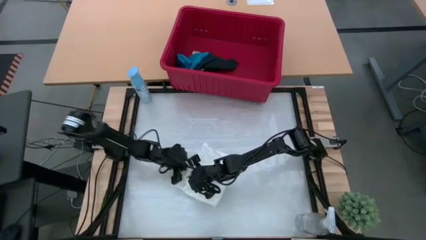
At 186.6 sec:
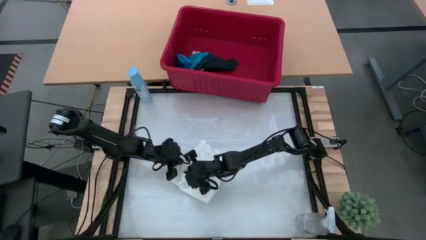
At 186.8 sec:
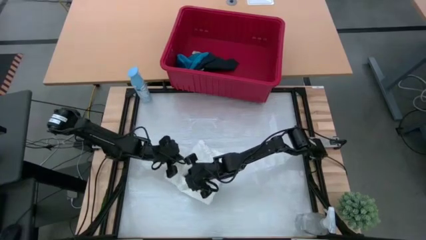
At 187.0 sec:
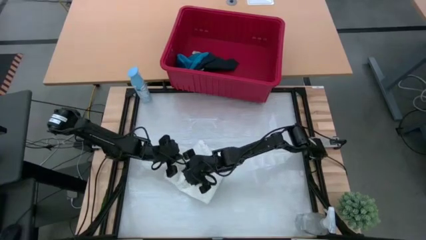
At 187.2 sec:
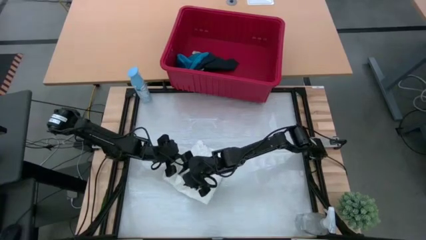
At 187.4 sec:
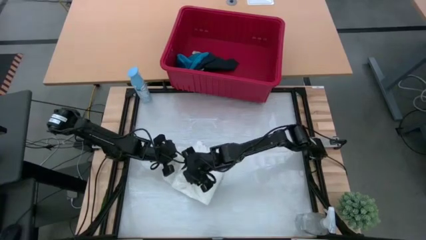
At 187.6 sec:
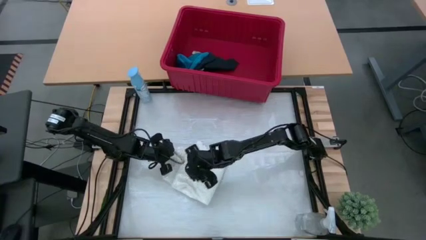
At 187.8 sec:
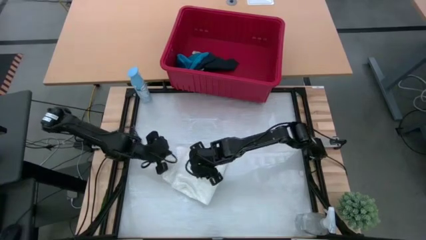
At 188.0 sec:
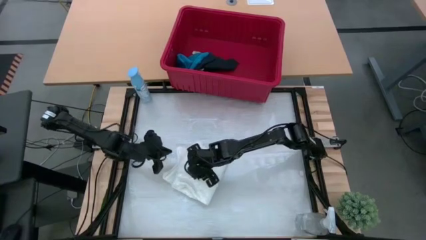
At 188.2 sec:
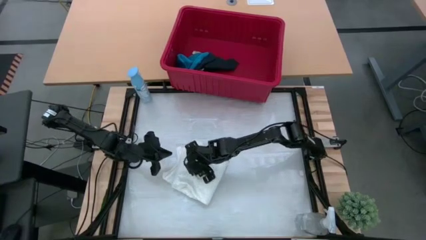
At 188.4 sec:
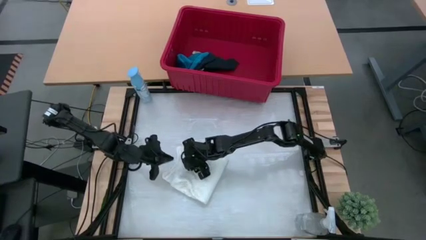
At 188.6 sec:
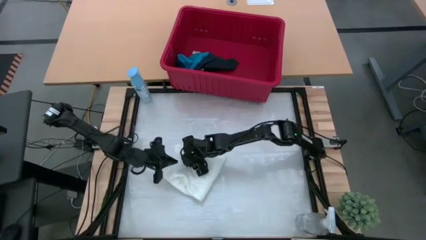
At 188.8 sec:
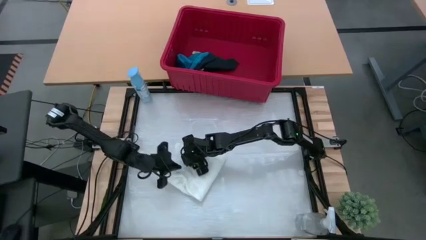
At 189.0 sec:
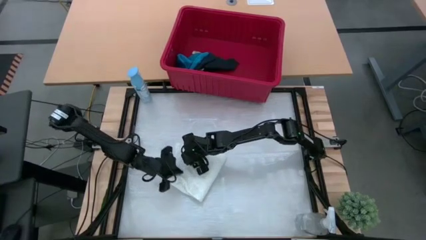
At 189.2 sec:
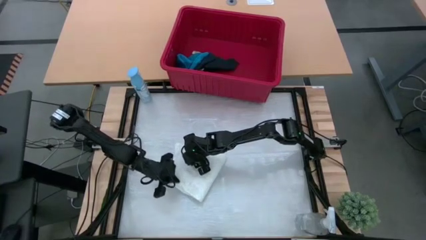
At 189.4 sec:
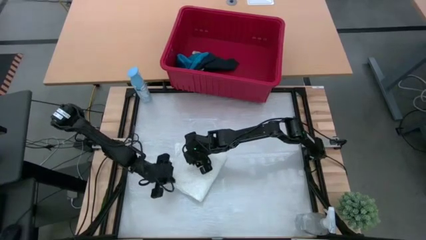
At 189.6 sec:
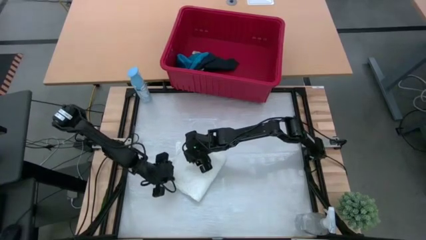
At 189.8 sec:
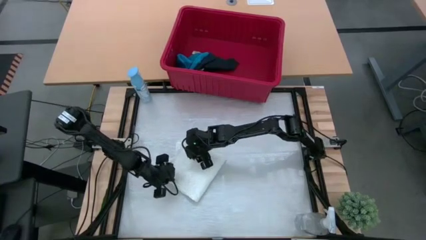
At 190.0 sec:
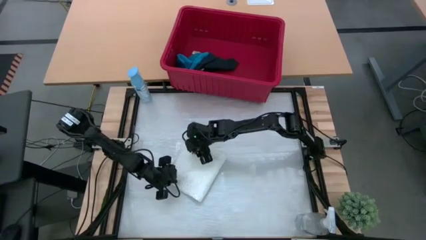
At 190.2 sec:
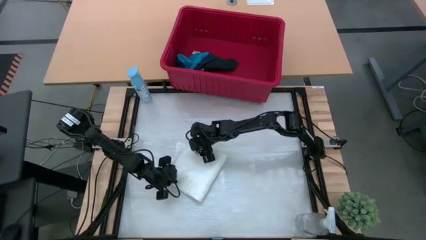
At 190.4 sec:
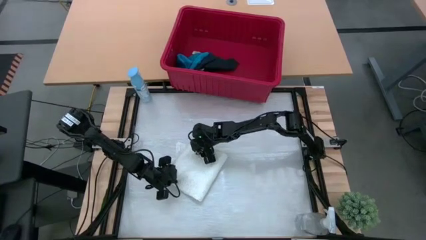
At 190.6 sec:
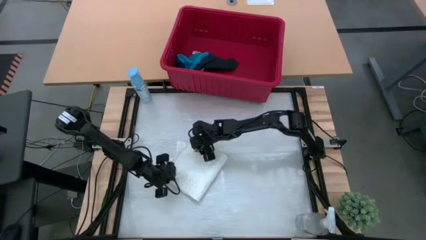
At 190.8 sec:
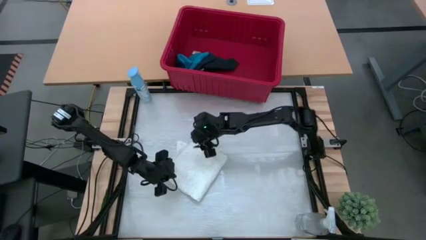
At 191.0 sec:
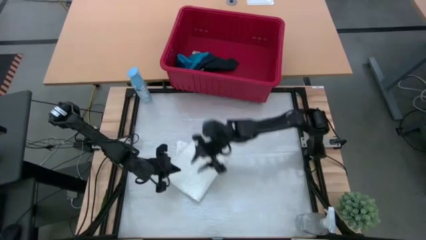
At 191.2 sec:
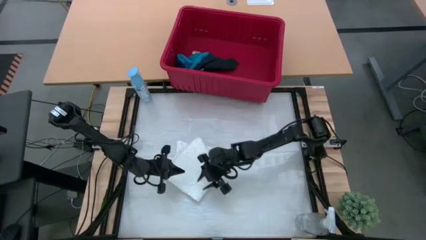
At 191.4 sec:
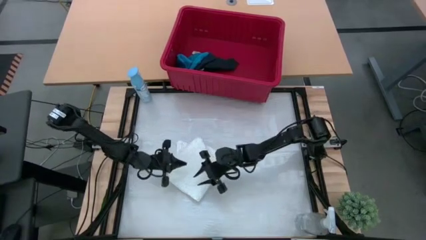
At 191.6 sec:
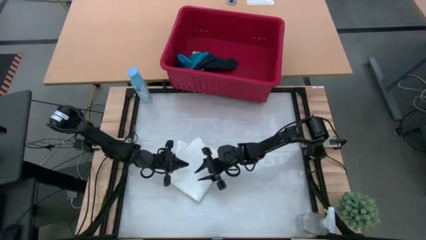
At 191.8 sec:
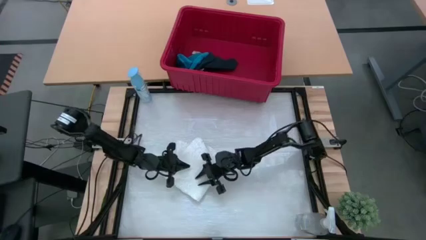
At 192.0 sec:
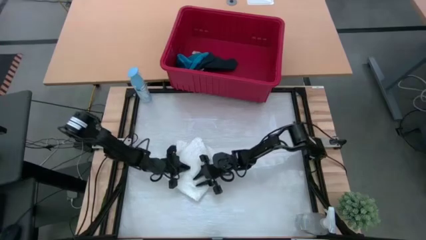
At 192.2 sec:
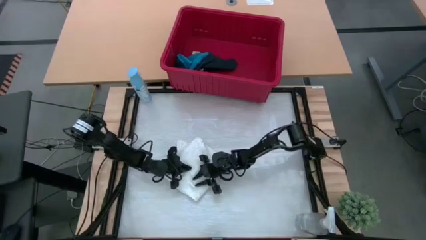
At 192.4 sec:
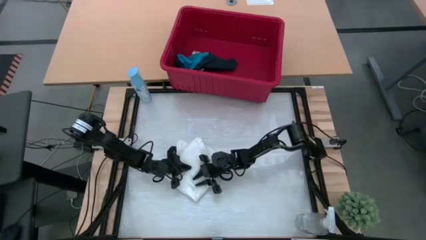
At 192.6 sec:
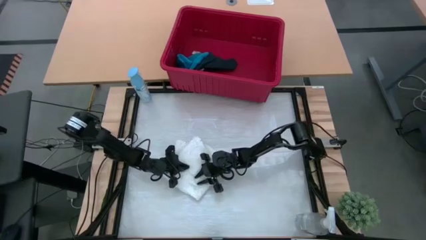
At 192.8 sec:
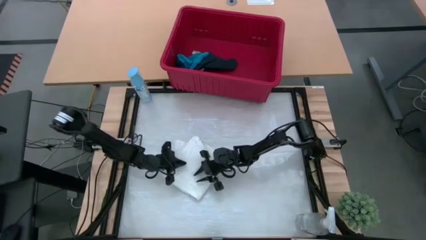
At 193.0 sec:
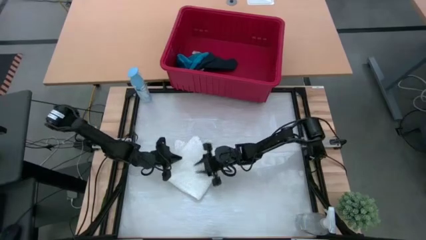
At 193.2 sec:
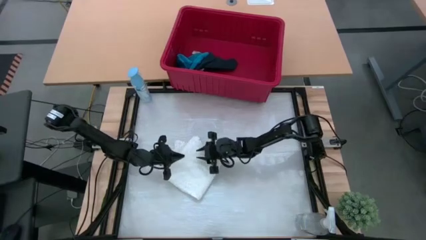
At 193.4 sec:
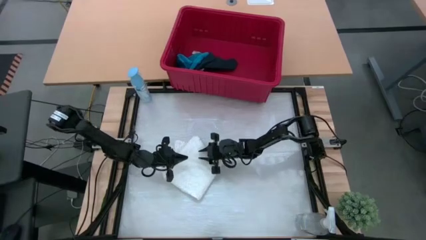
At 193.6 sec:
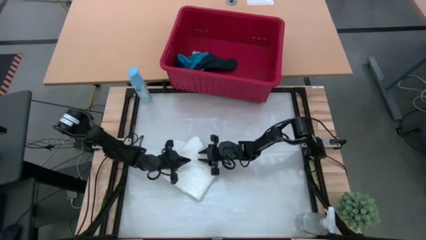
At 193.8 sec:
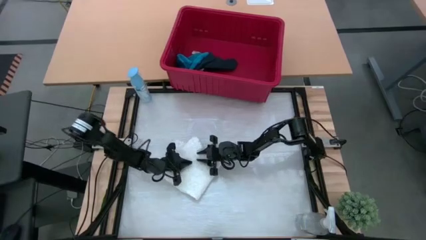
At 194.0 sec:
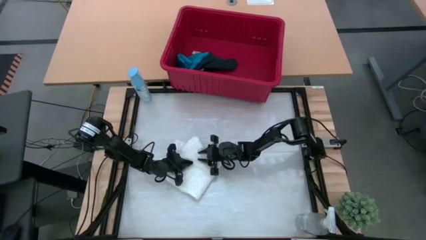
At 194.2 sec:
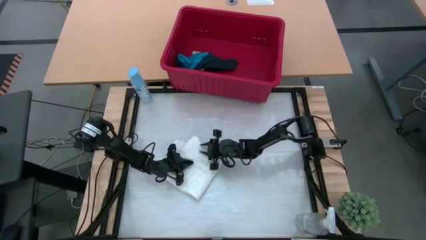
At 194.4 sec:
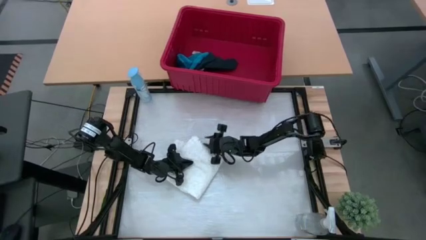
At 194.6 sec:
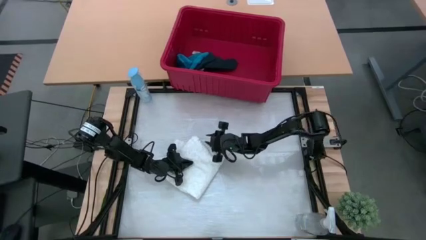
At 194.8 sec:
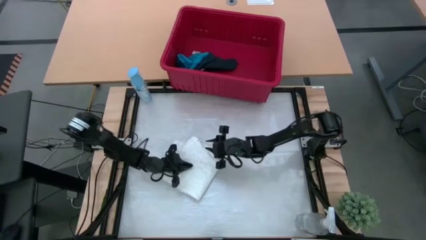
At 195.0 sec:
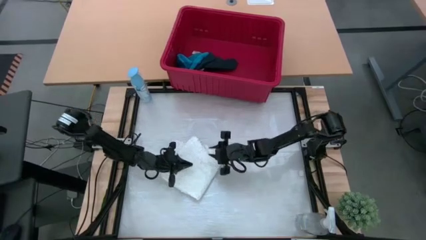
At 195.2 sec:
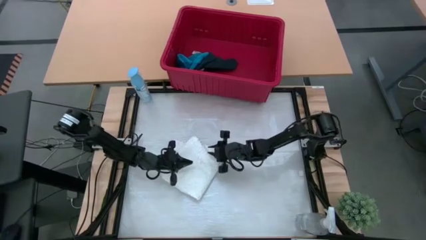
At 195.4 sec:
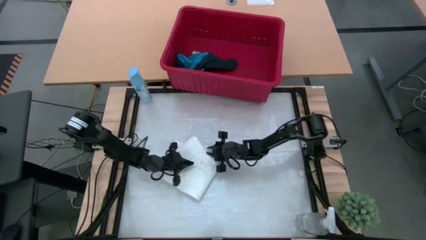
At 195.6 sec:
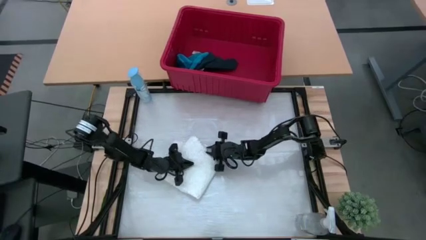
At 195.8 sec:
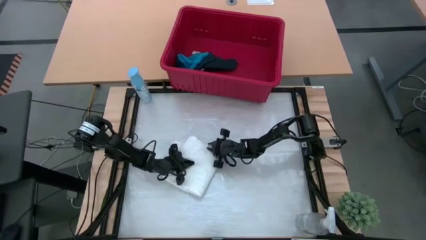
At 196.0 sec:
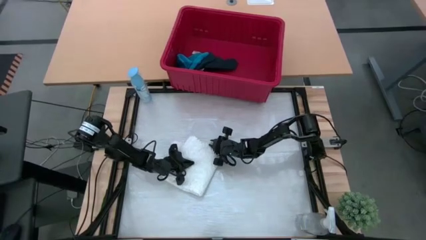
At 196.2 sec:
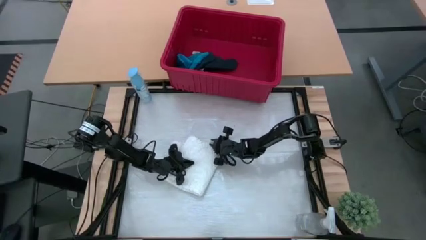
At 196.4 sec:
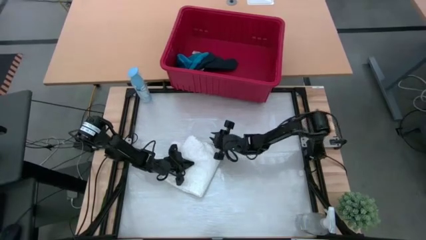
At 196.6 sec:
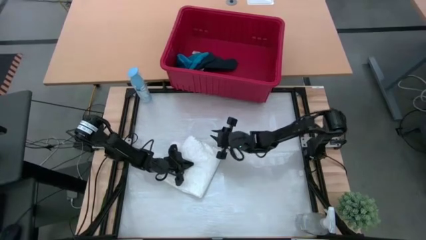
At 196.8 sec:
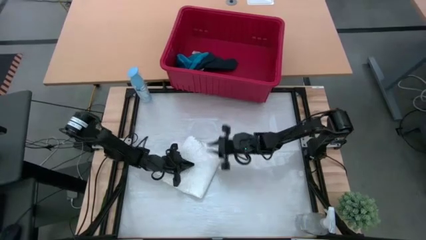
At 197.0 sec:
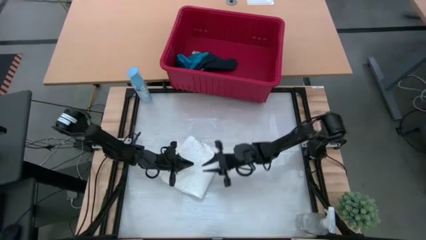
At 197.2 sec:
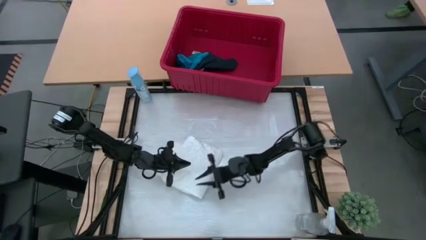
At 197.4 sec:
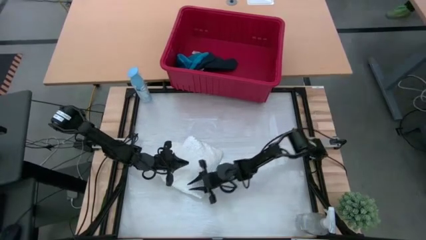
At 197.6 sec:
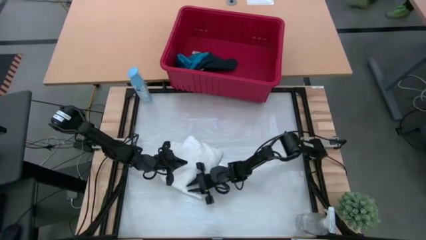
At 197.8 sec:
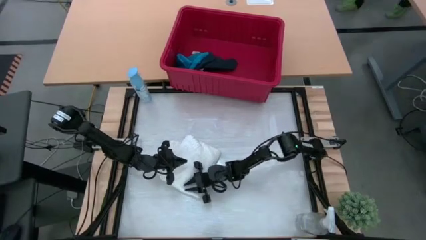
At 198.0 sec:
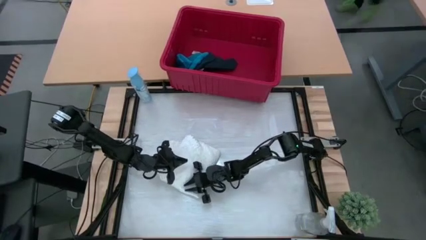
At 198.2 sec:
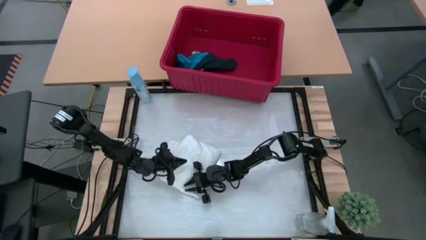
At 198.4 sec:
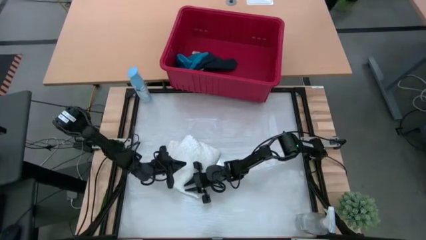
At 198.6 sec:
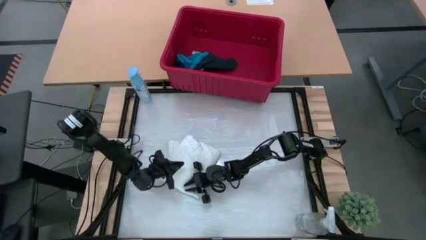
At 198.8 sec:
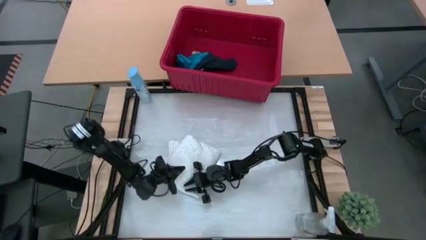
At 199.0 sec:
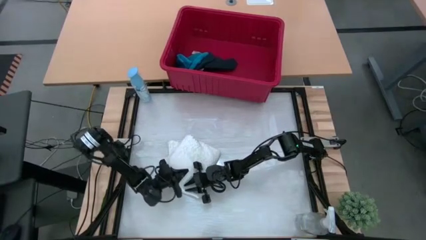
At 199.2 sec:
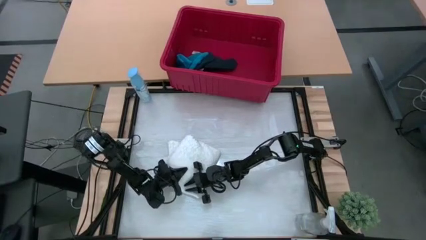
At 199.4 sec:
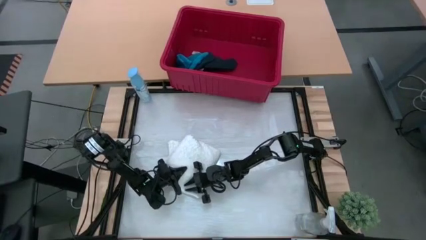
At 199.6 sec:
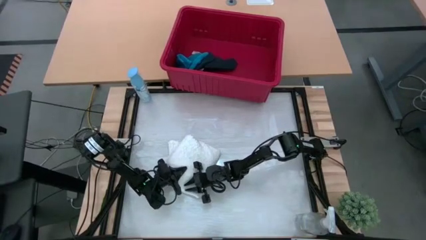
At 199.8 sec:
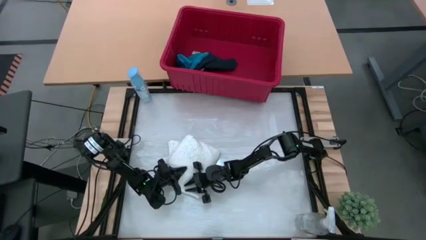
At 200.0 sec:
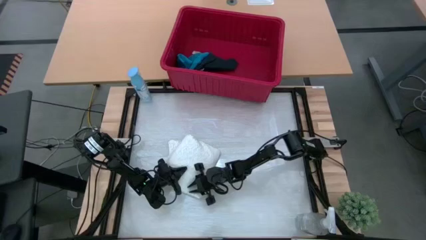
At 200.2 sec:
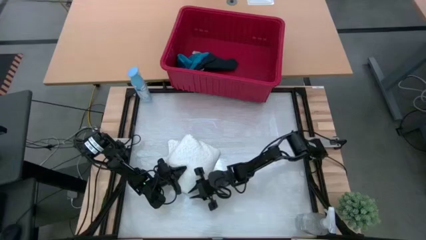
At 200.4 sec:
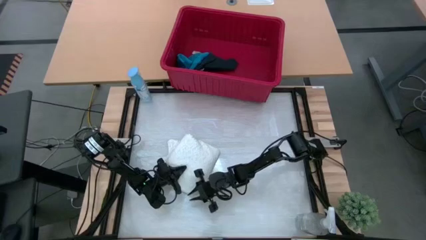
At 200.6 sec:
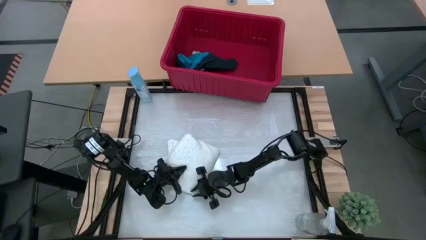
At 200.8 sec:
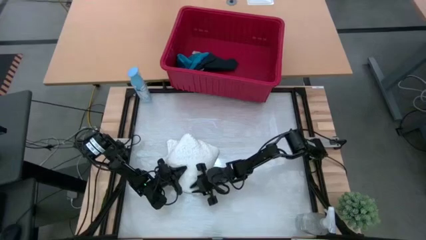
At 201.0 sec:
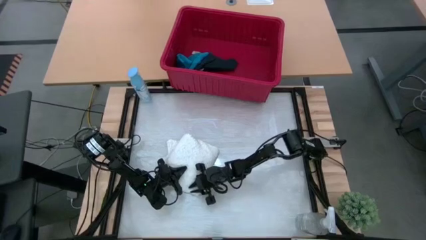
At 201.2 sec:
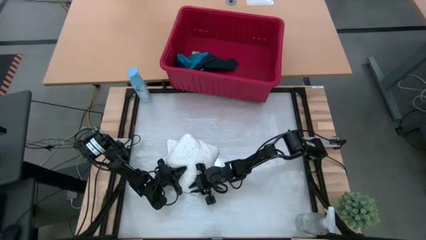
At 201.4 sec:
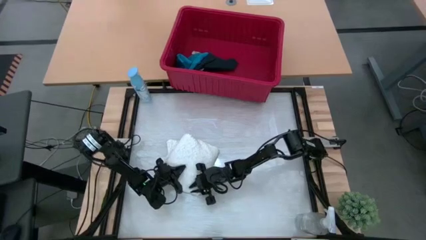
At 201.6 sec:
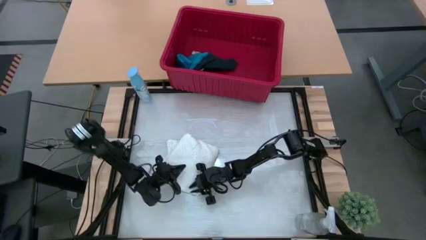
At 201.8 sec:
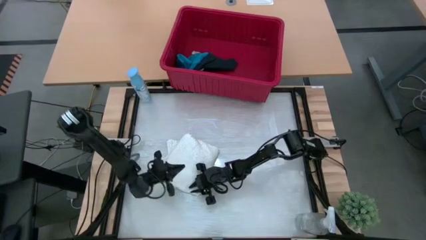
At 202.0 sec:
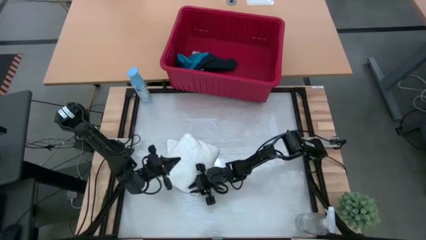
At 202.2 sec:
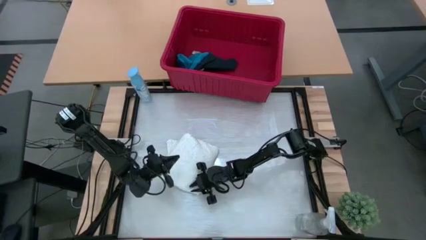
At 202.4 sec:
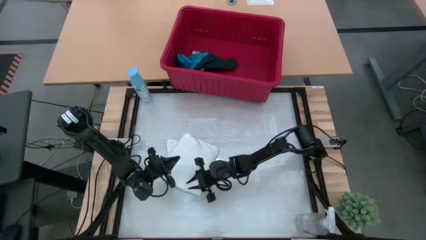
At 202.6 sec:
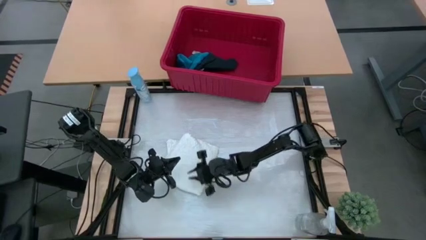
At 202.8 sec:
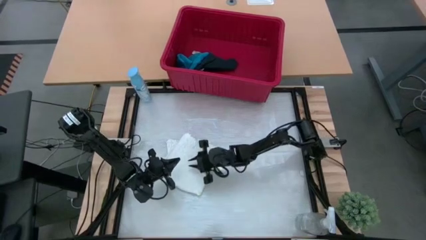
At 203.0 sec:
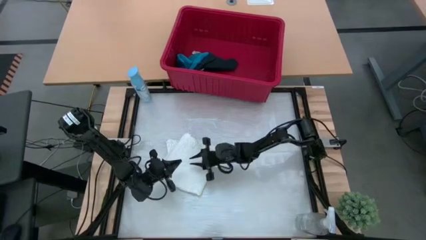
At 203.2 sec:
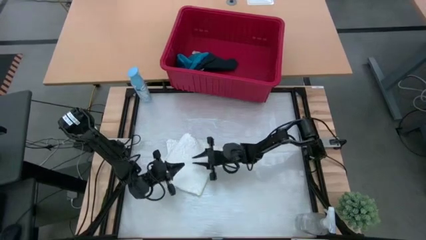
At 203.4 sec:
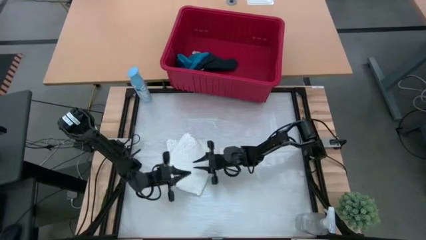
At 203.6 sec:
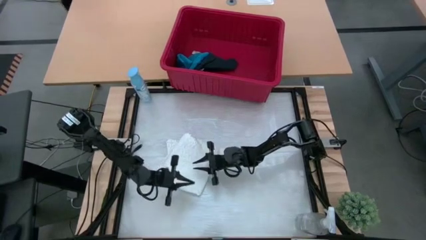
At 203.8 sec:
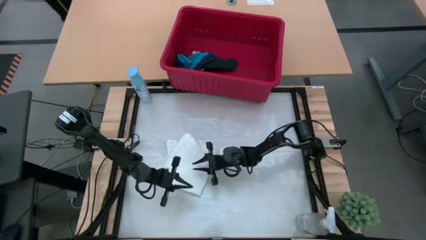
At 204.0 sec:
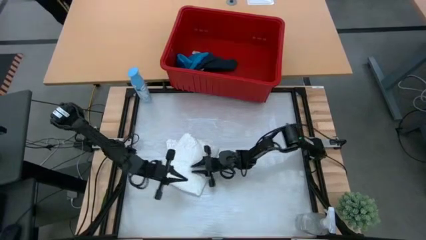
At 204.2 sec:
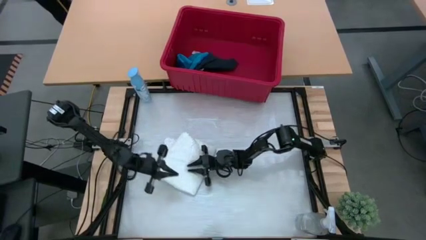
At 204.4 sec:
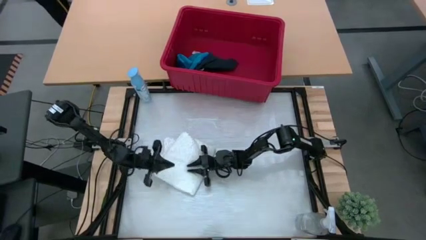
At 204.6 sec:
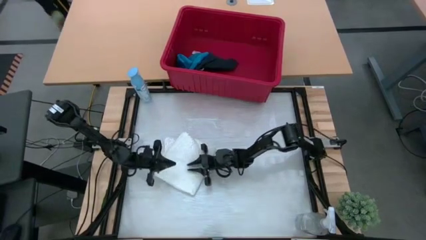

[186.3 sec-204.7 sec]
Task: Fold Laundry from Bin
Fold the white shirt
